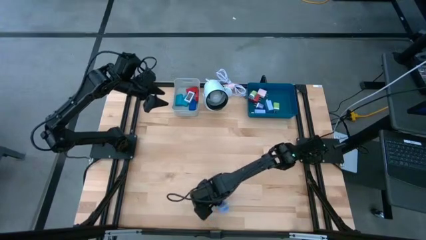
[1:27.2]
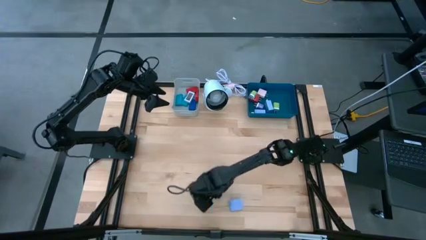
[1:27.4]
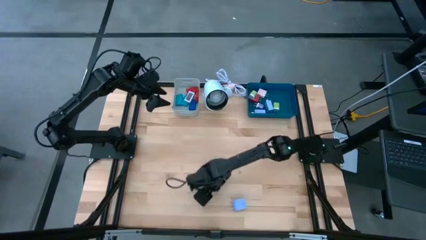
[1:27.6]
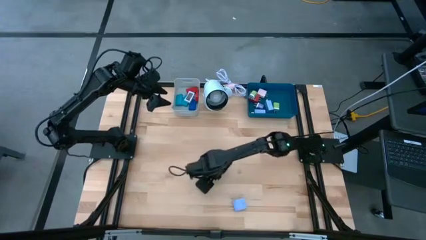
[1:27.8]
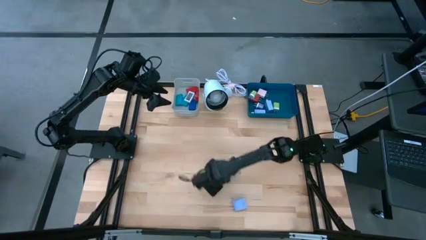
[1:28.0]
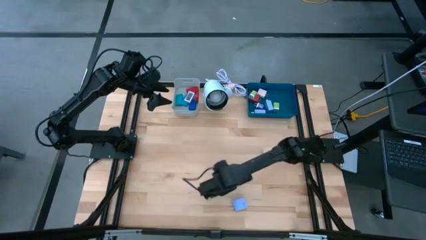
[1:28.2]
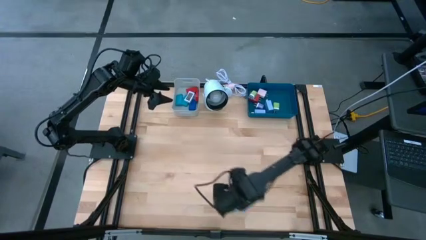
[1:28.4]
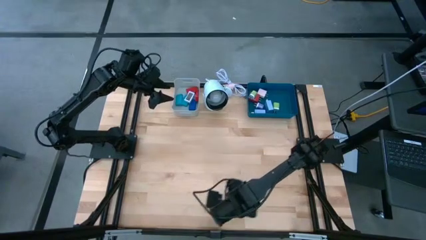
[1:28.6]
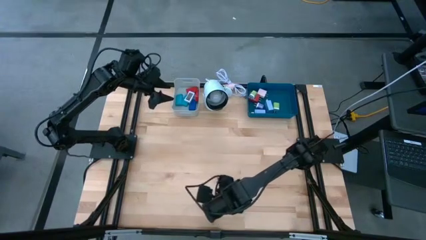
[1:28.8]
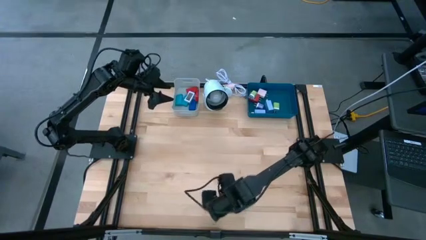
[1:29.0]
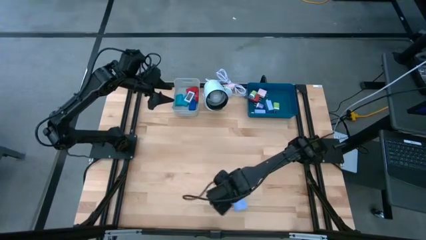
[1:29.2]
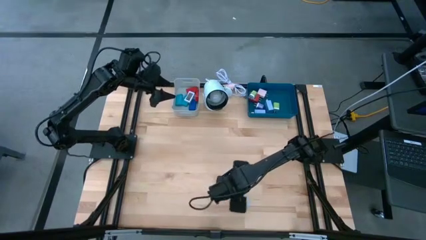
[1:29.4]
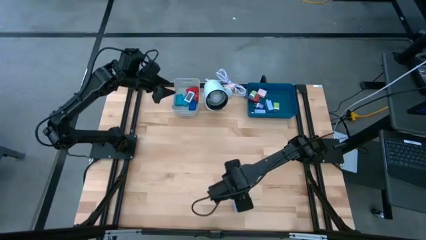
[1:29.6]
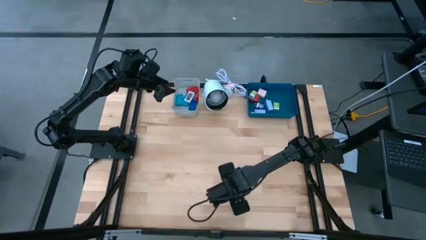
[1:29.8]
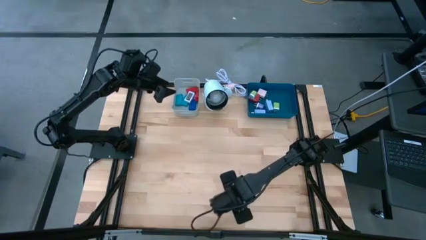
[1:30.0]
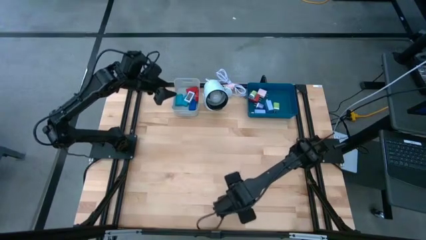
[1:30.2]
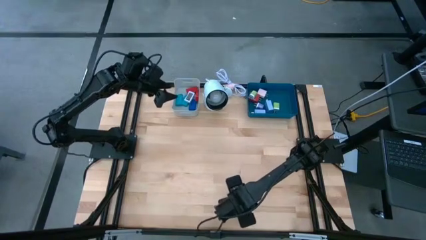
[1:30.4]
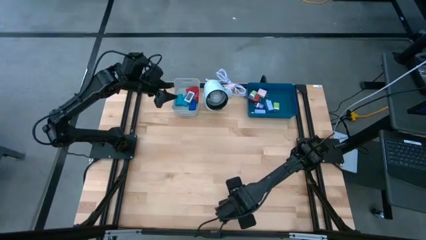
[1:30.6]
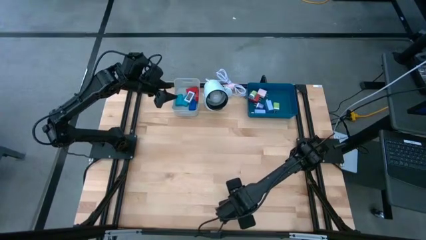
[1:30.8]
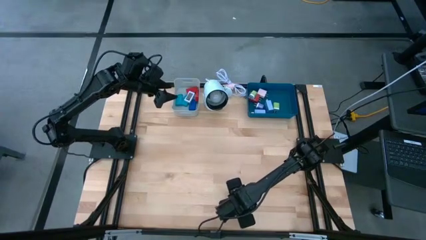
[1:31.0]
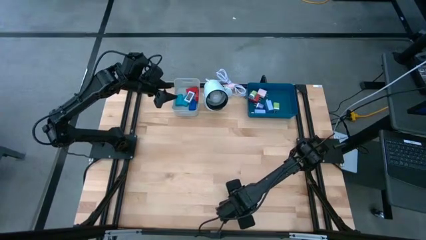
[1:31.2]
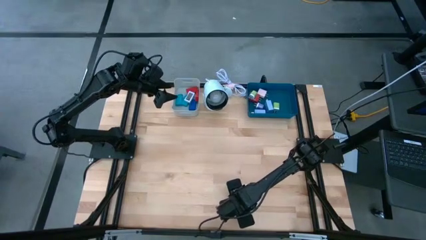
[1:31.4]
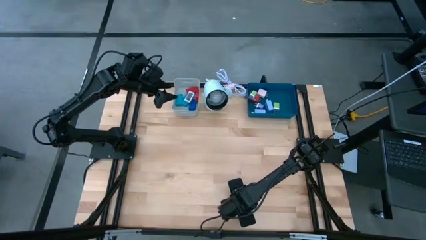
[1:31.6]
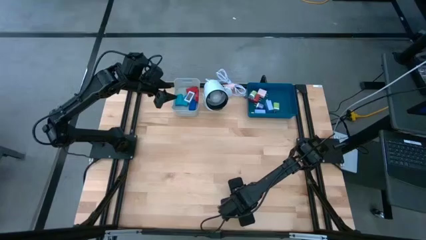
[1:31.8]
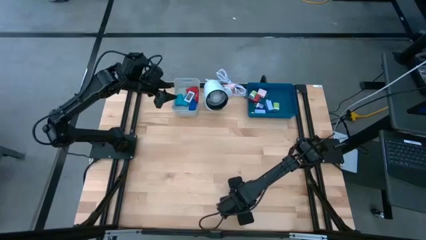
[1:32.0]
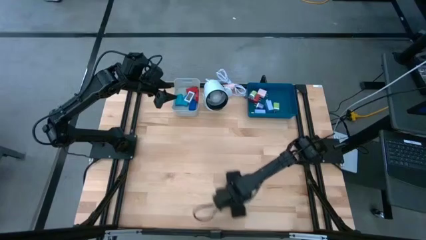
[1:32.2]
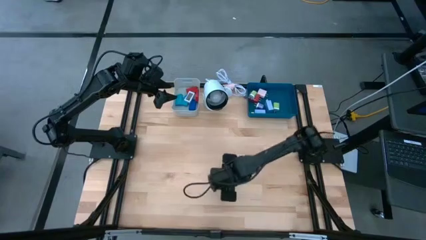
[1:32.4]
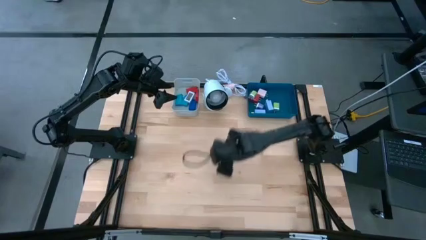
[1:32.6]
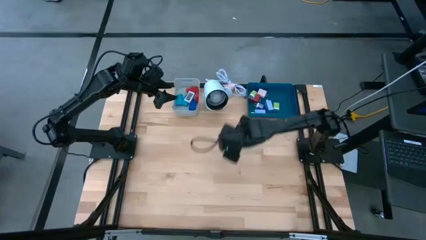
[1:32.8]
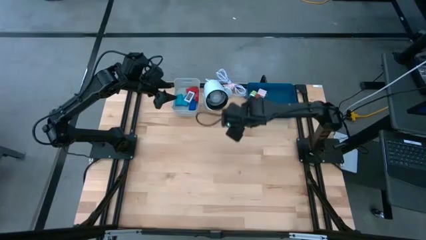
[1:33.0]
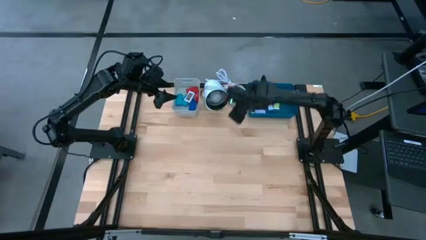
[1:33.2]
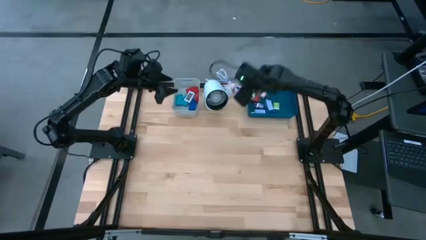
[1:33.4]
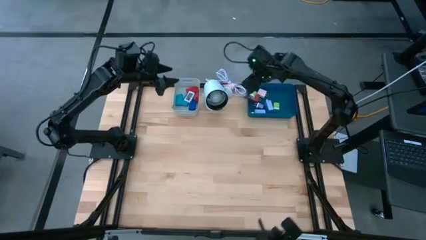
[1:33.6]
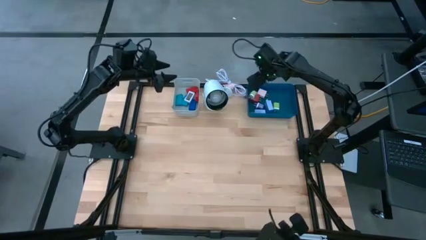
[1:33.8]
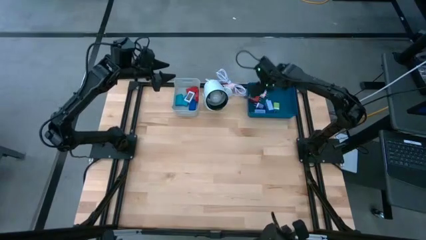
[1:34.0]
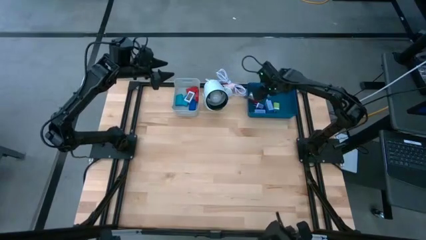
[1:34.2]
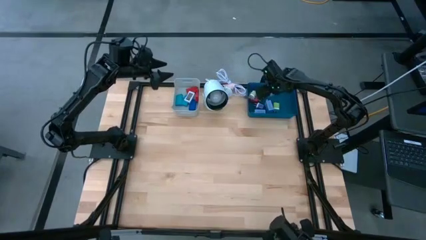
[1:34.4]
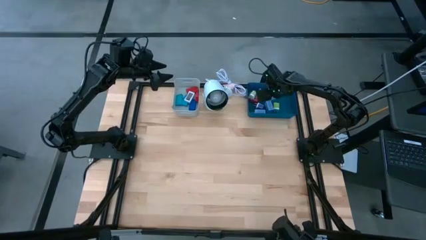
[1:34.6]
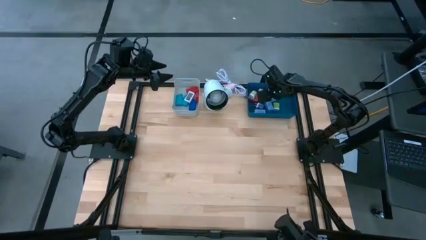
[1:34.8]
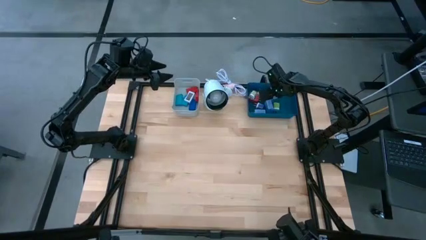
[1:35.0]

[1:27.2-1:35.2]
Task: Pick & Place Office items
Put the light purple charger adapter into the blue bin

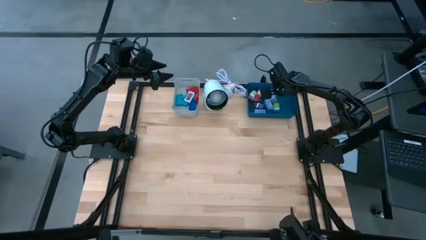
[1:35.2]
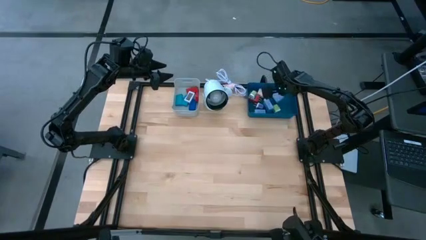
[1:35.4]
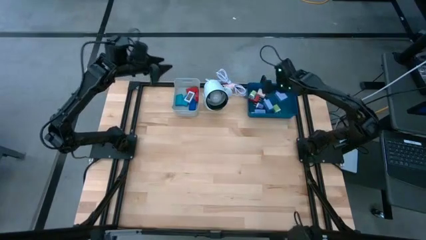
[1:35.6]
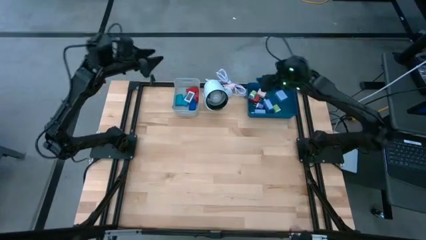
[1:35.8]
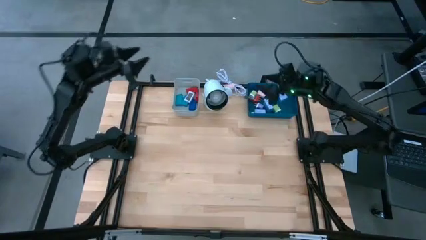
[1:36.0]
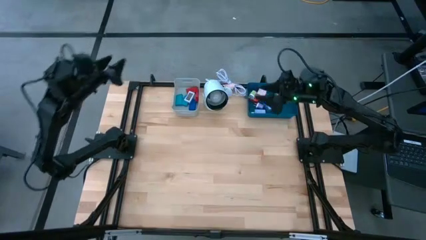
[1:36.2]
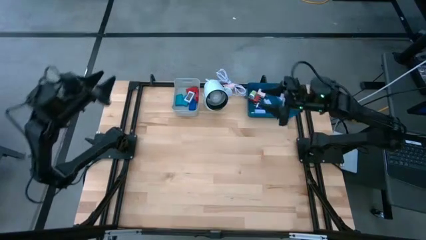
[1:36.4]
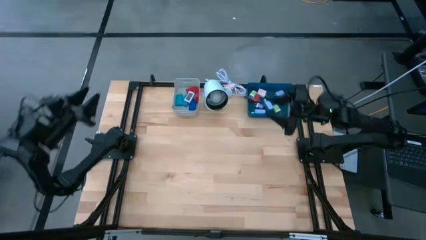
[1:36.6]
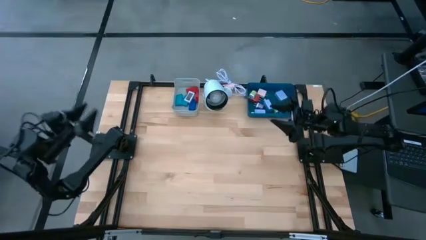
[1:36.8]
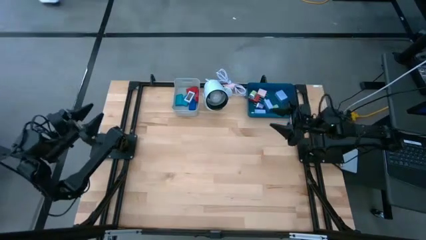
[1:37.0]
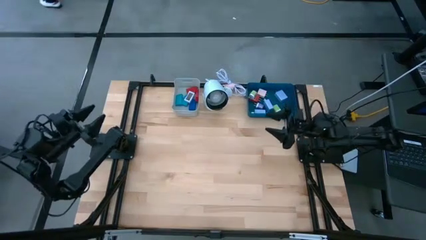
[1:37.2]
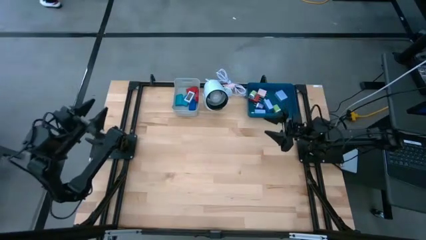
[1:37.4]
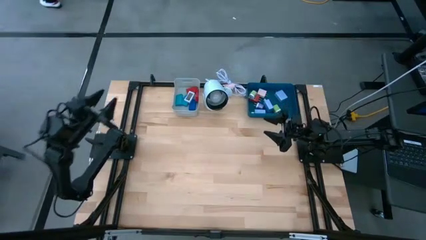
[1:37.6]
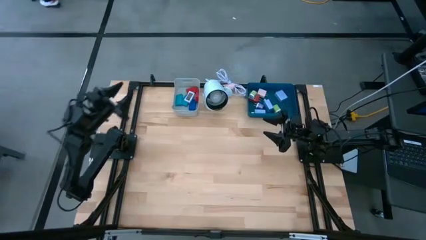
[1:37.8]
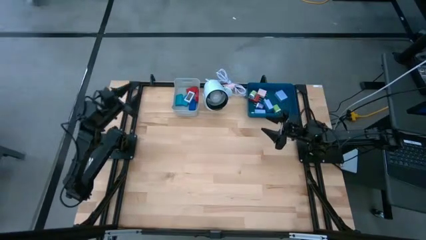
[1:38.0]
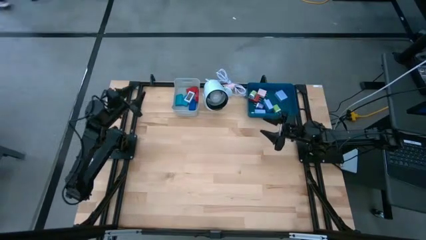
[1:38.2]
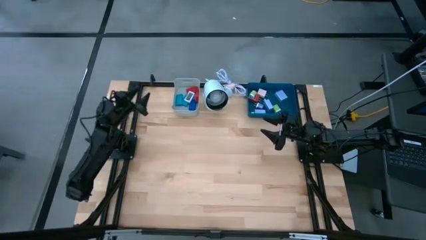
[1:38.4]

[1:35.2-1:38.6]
Return to Home Position

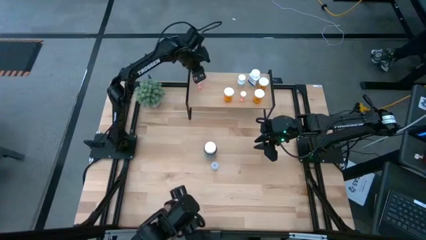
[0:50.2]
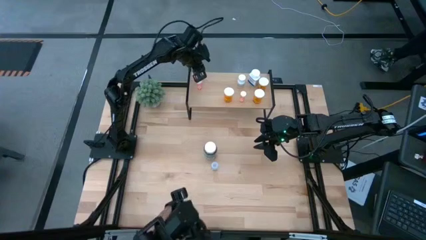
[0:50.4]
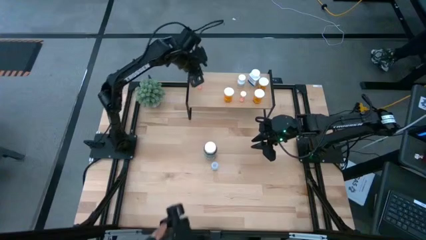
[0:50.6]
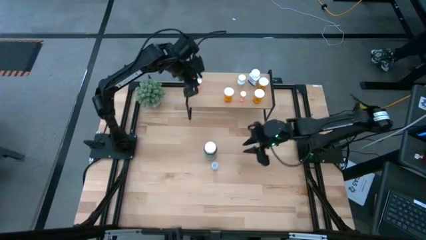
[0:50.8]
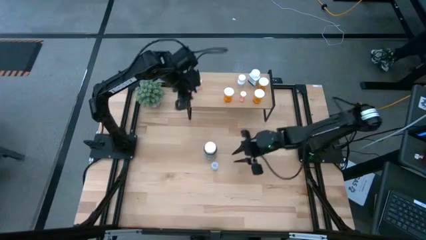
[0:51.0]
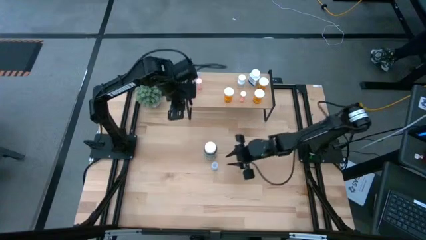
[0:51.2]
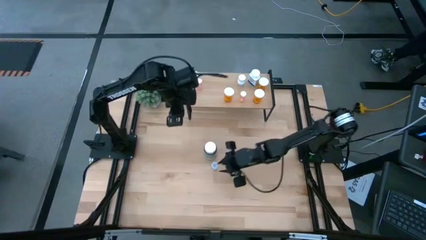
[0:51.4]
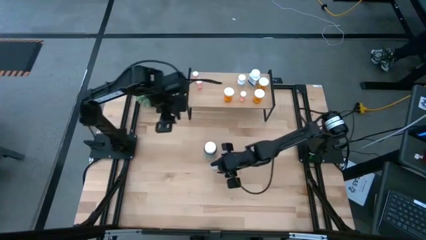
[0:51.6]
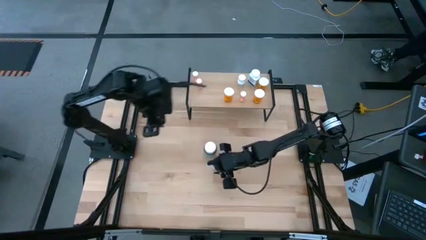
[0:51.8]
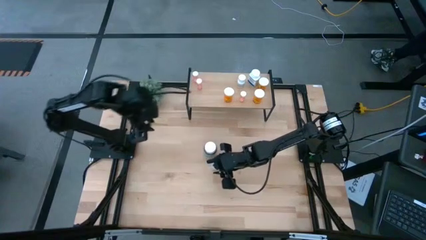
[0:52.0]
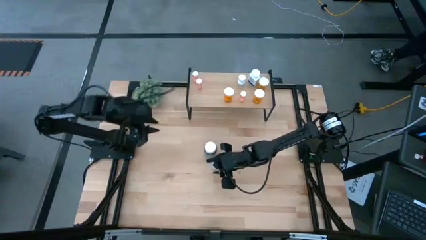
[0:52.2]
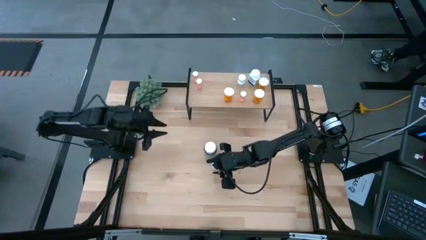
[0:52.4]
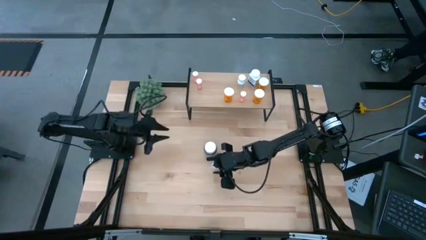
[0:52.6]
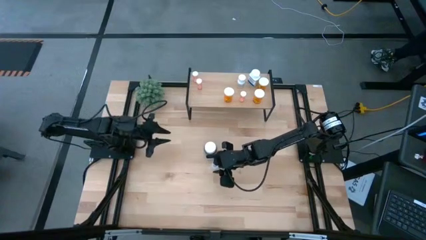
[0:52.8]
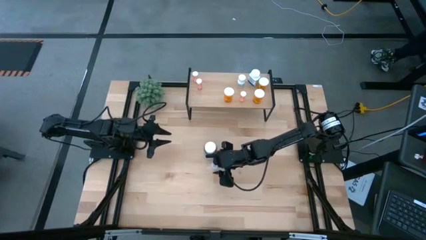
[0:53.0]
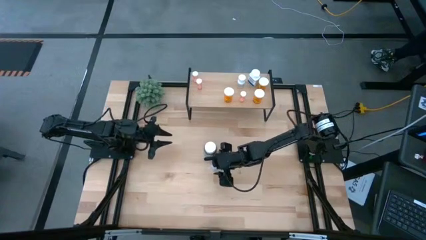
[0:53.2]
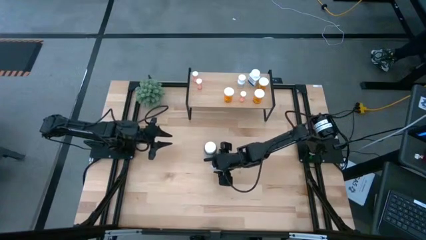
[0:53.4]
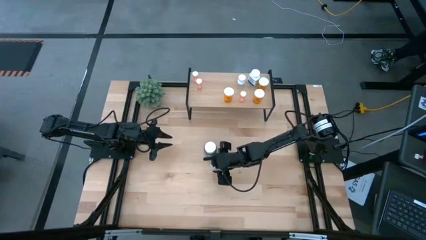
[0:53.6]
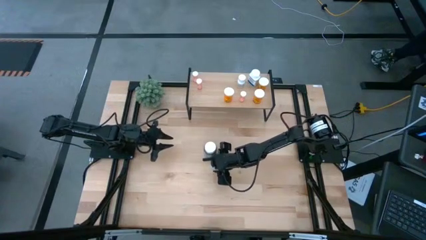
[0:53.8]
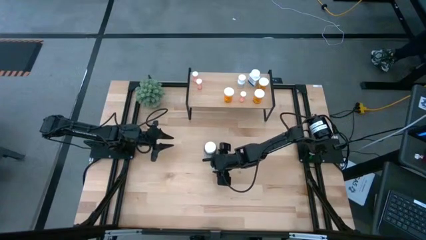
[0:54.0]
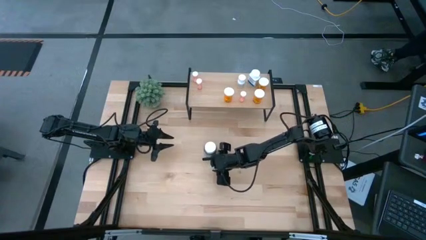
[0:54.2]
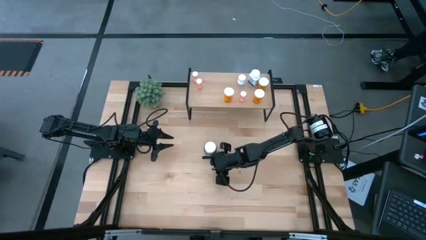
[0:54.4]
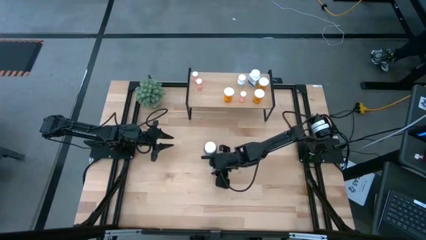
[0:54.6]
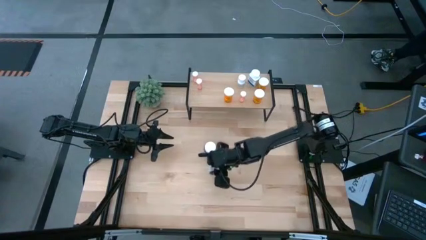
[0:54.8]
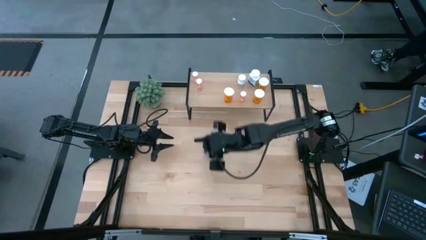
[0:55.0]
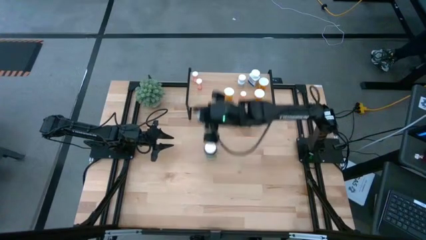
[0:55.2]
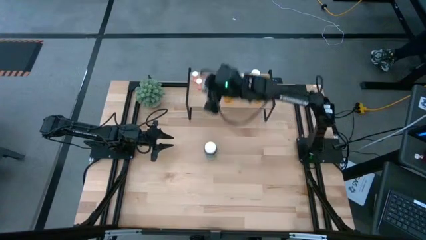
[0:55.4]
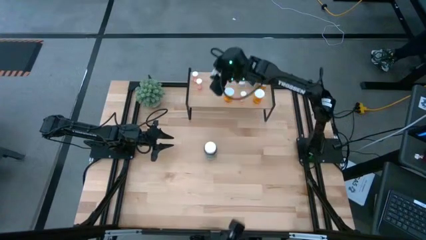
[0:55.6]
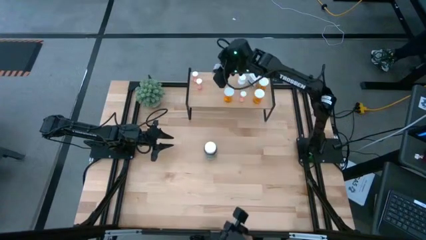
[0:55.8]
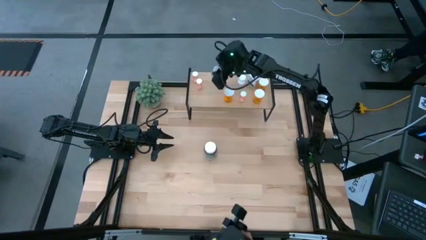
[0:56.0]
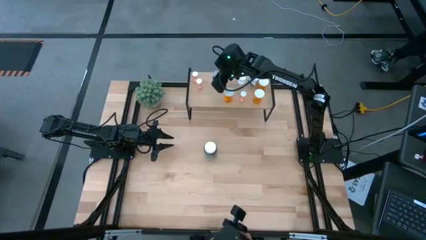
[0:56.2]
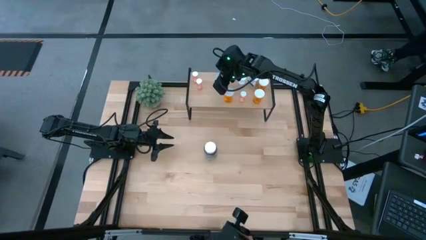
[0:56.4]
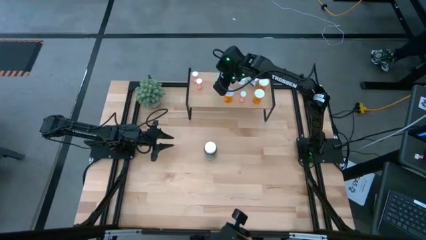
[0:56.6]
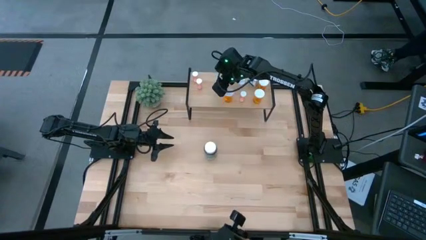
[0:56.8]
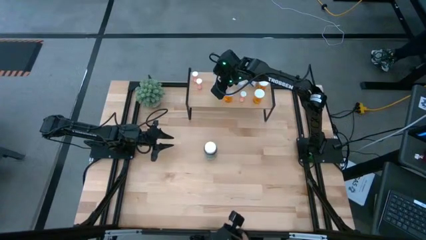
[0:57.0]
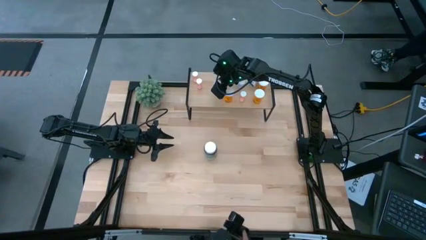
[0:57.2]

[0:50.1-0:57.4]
Task: Pick and place medicine bottles onto shelf by color
Put the transparent pill bottle on the shelf
